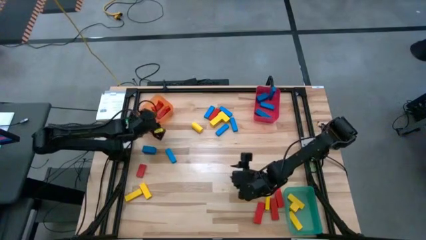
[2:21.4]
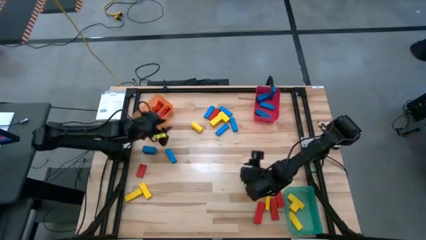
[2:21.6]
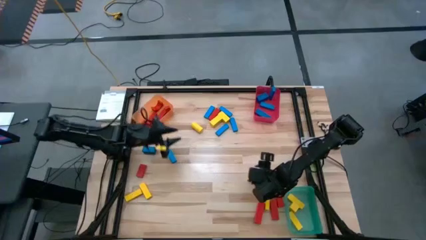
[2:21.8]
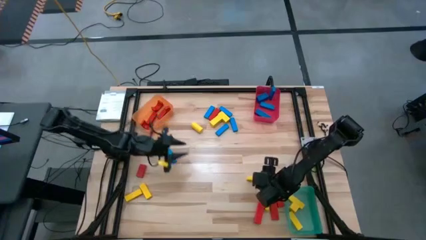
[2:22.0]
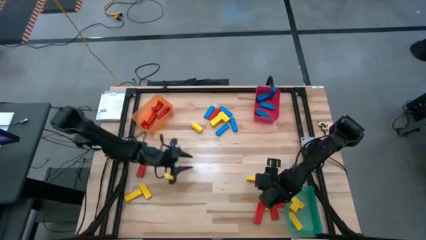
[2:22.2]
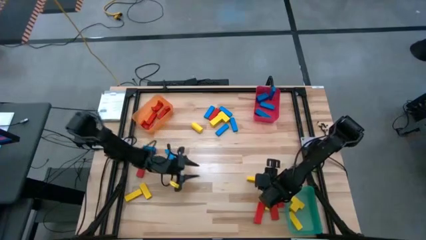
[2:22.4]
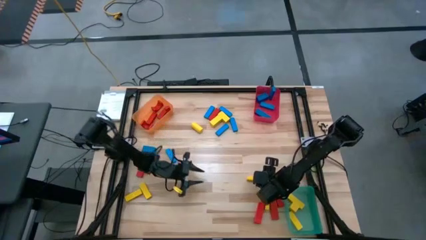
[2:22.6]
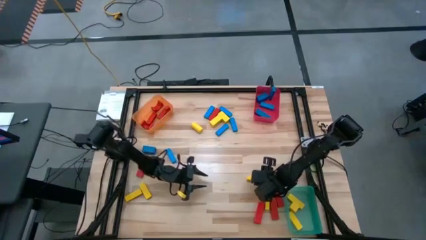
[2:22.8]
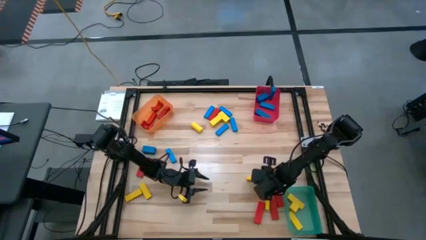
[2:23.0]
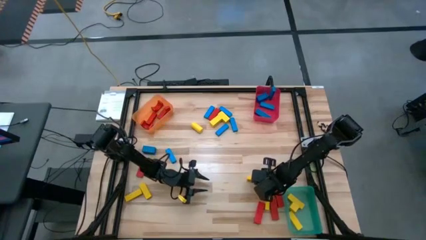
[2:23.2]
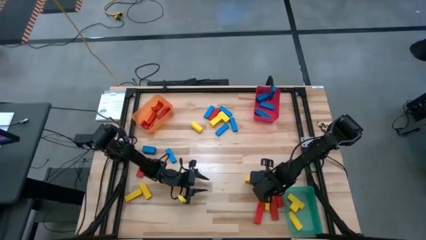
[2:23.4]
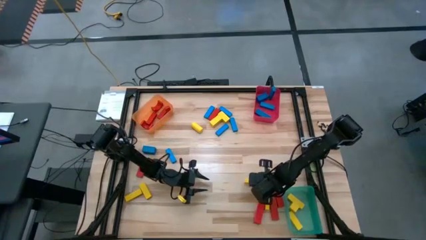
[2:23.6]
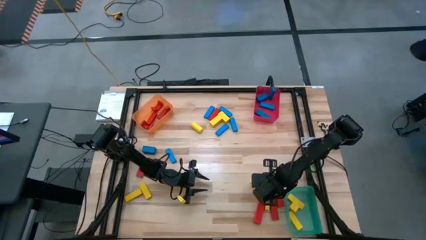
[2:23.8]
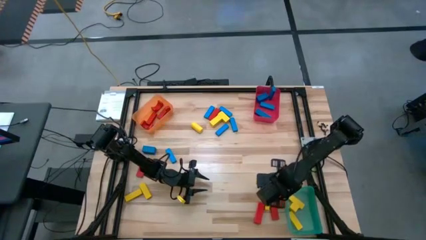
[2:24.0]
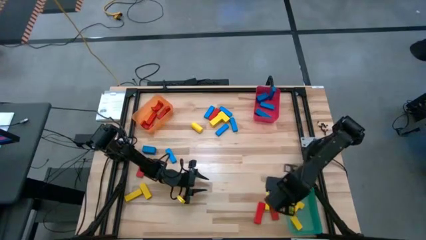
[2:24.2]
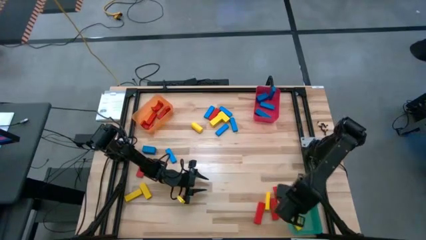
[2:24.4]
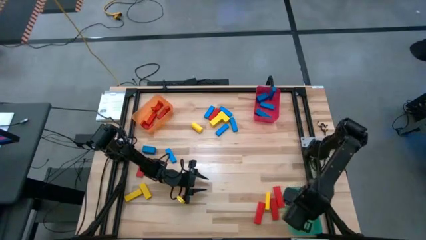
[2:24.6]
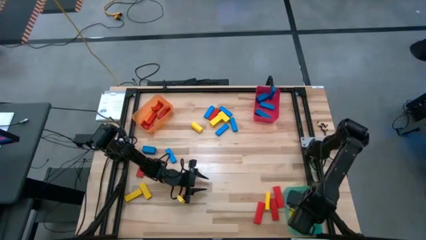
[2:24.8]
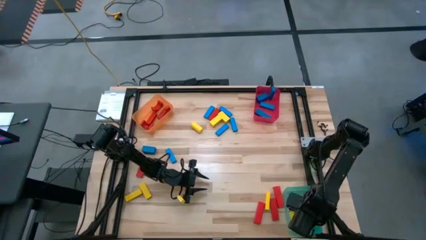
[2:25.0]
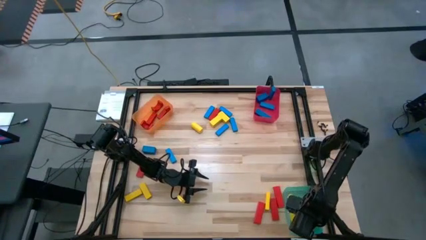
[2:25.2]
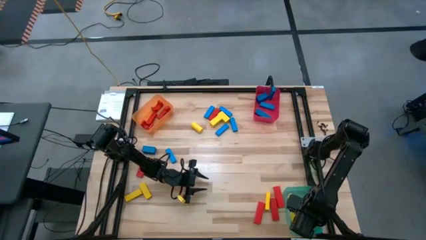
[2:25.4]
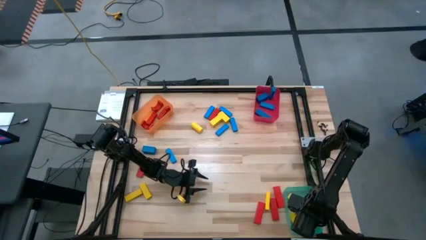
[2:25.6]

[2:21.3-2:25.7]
Task: Sort blocks
Put the yellow block into the green bin

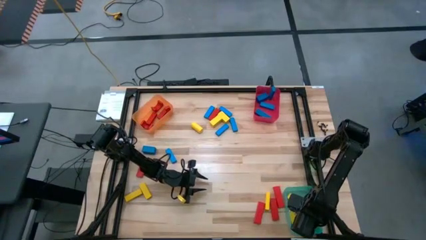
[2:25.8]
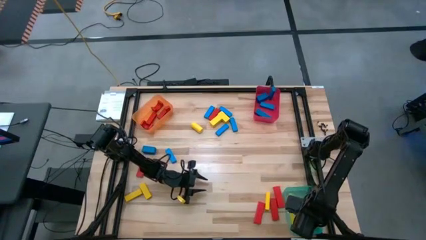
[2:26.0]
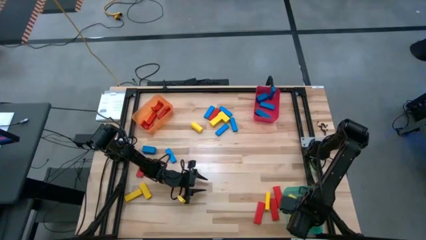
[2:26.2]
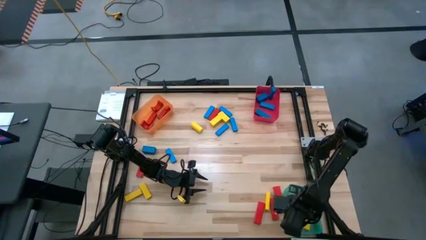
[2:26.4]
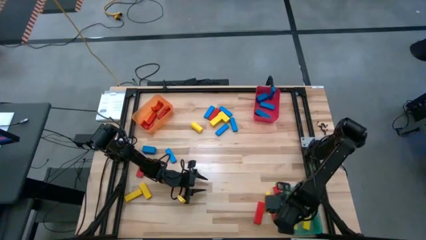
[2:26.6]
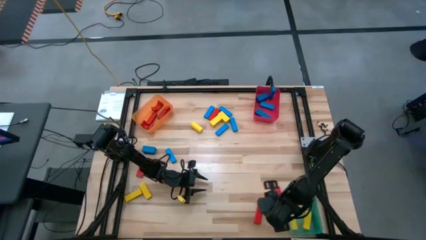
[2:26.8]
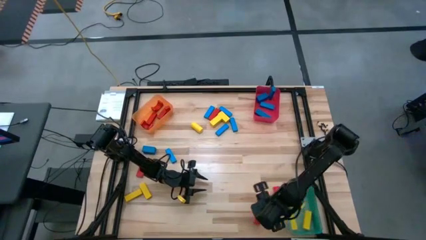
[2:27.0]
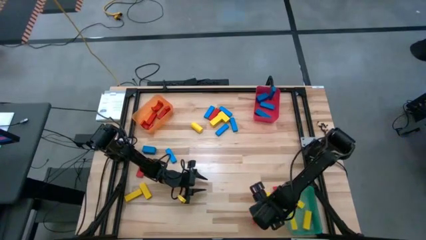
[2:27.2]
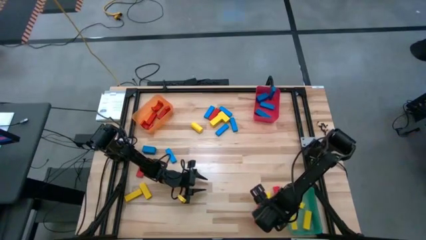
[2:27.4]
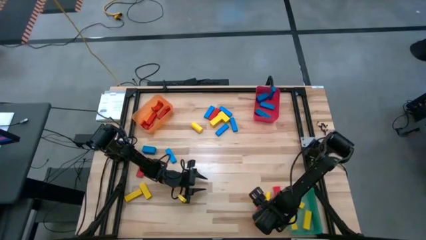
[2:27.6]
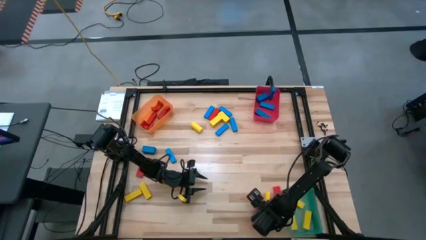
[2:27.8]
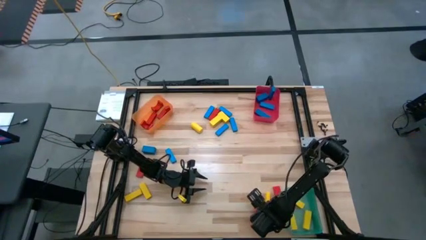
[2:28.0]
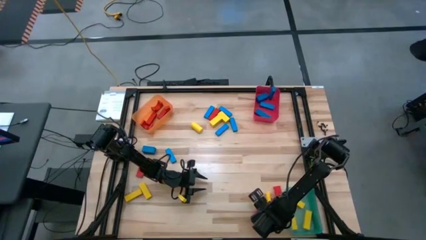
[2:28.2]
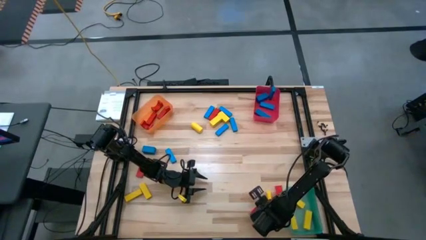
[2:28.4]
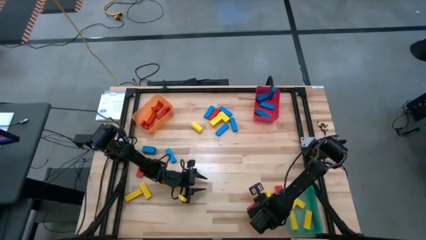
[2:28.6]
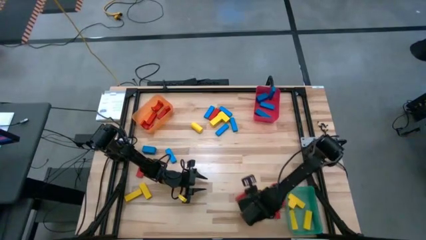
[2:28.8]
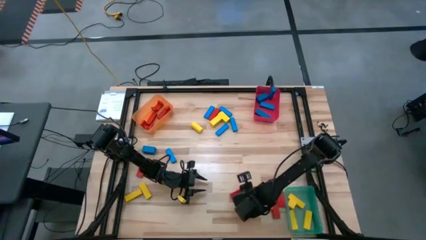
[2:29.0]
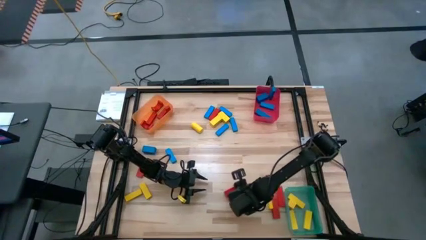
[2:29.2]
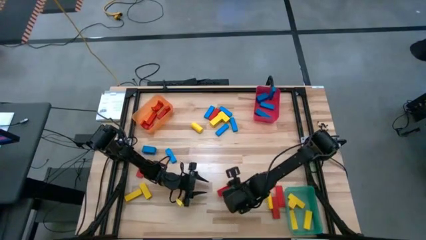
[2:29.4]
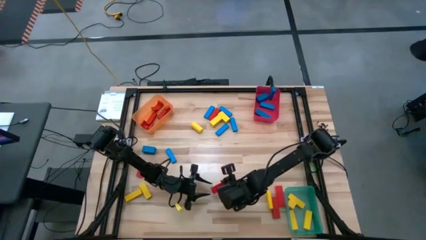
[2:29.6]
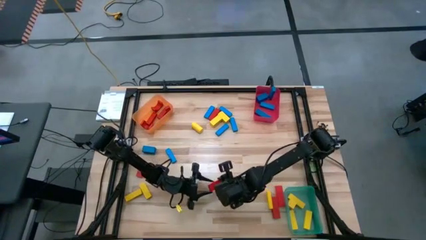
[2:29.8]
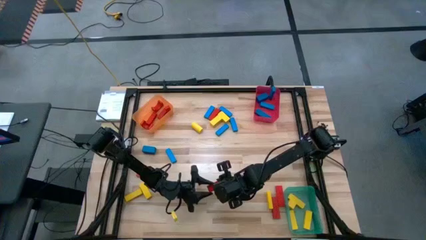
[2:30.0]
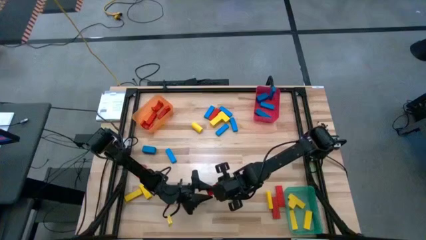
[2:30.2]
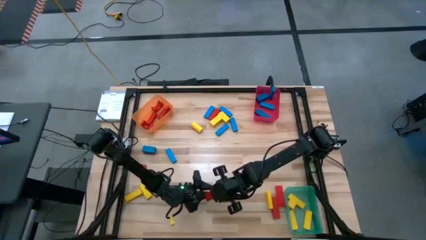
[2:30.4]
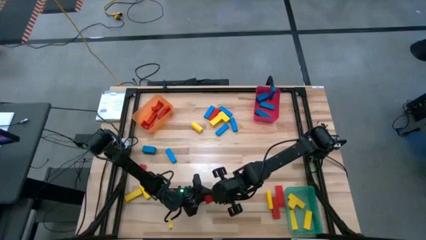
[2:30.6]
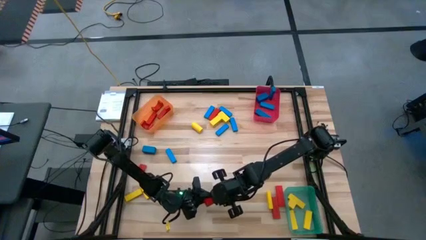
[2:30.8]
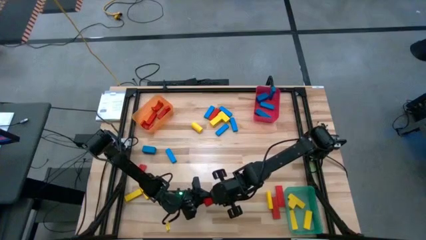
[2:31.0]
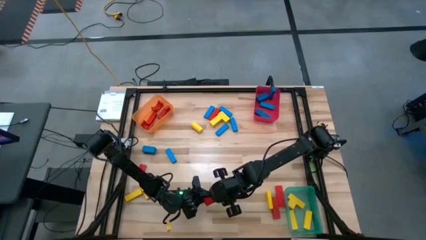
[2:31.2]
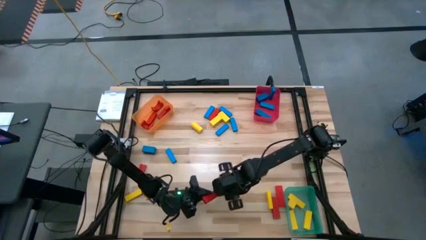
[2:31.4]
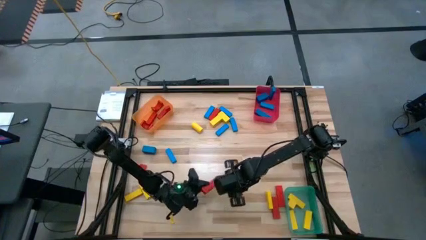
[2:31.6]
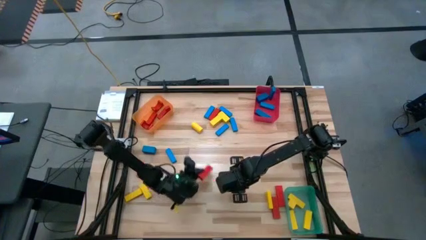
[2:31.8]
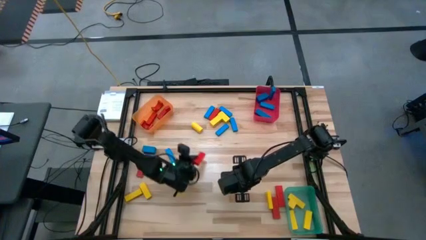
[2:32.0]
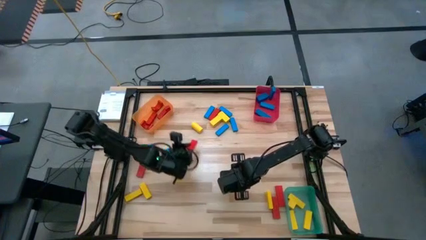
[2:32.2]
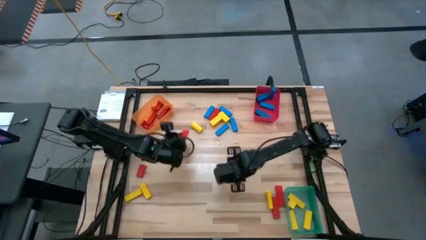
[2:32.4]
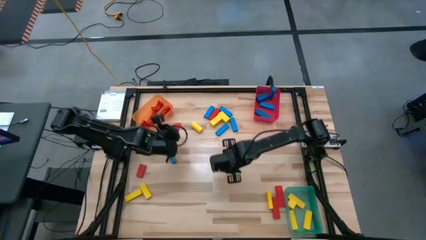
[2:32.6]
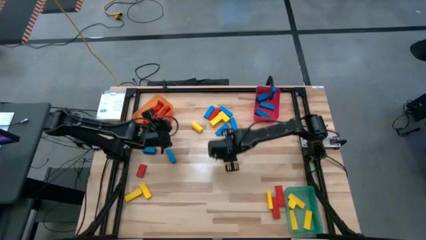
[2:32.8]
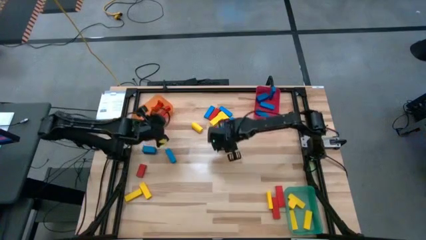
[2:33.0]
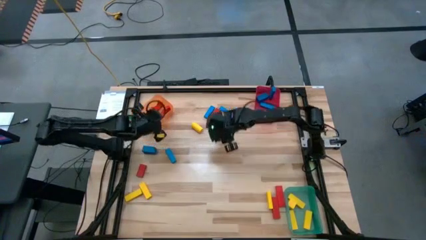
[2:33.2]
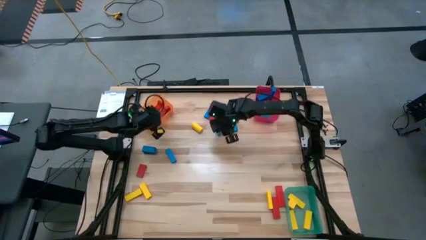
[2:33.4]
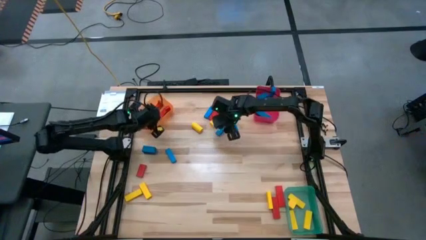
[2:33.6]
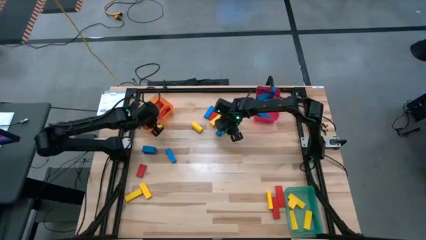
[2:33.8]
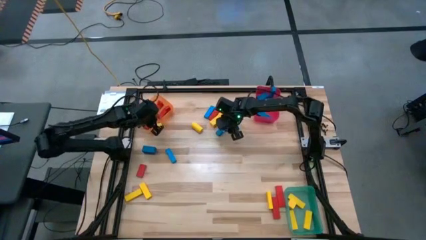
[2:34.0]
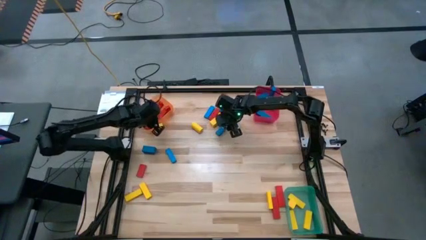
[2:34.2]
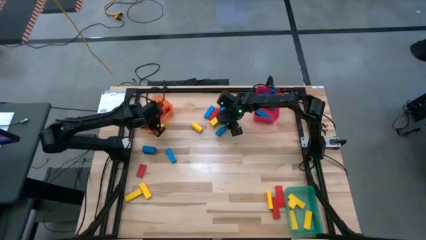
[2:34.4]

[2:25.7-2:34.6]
Put the red block into the orange bin

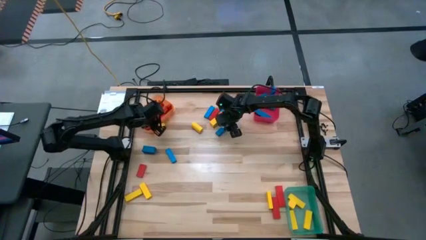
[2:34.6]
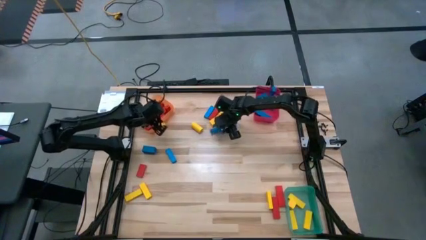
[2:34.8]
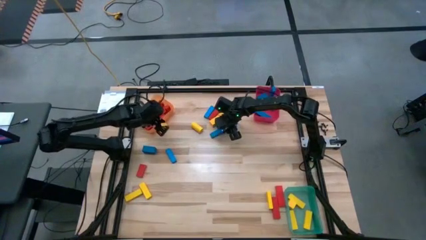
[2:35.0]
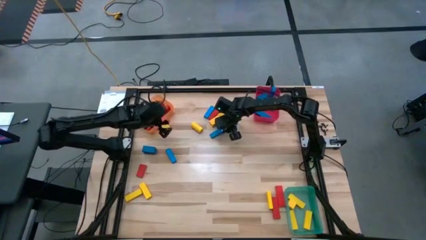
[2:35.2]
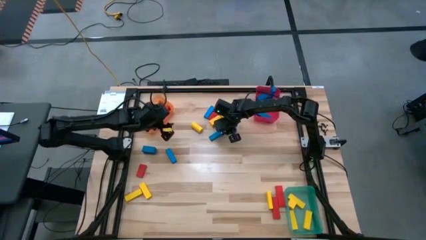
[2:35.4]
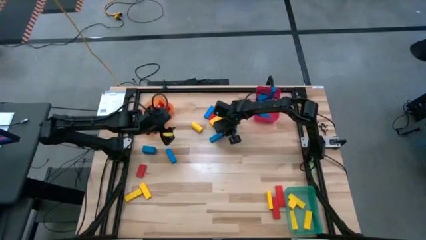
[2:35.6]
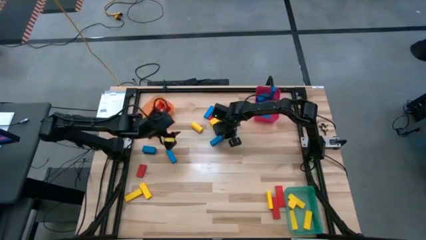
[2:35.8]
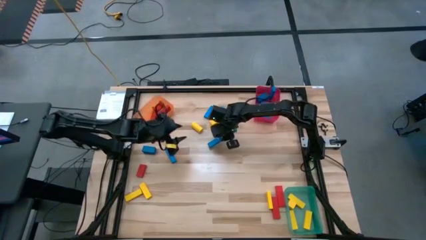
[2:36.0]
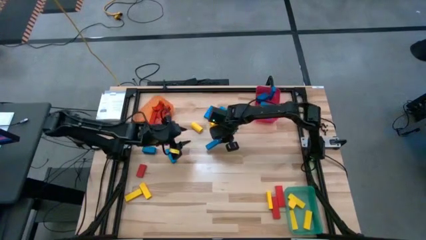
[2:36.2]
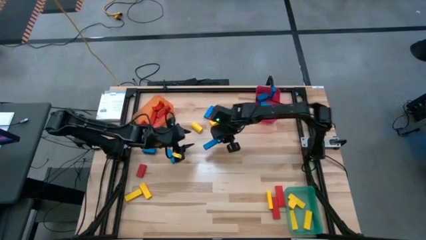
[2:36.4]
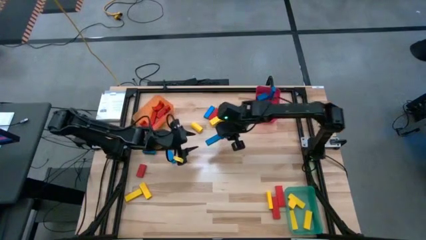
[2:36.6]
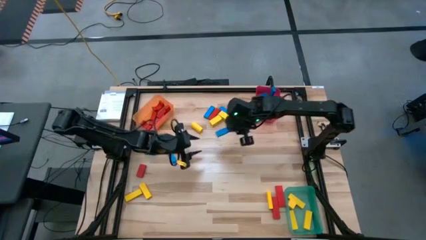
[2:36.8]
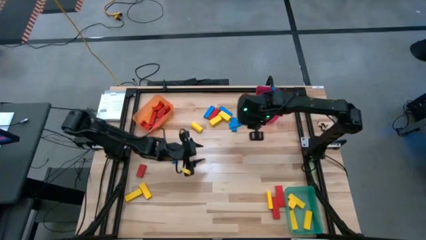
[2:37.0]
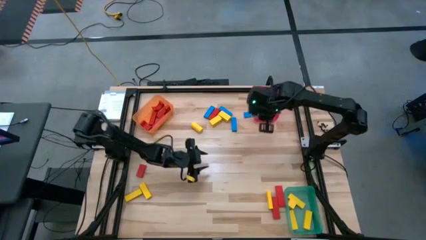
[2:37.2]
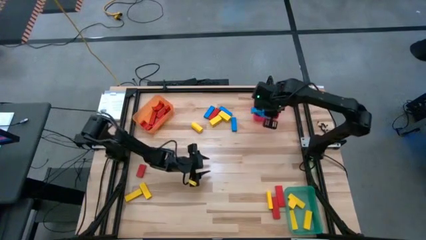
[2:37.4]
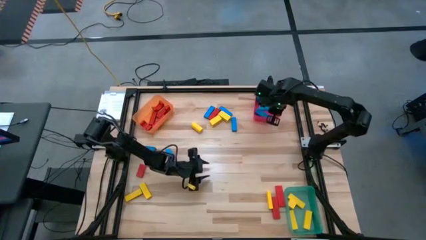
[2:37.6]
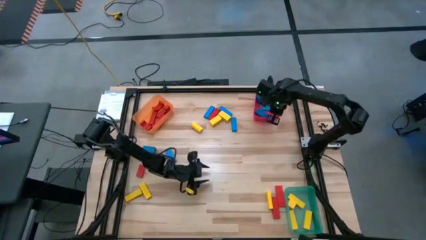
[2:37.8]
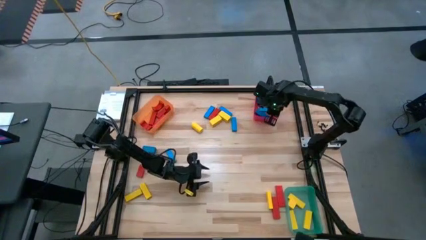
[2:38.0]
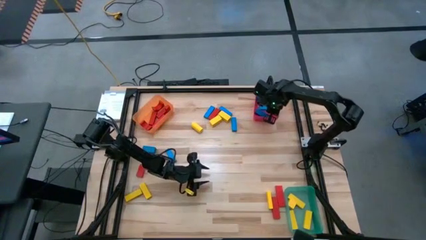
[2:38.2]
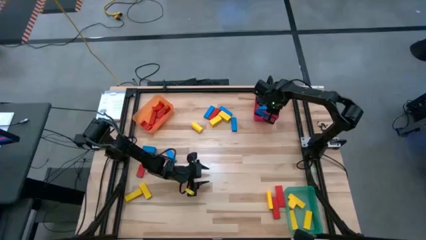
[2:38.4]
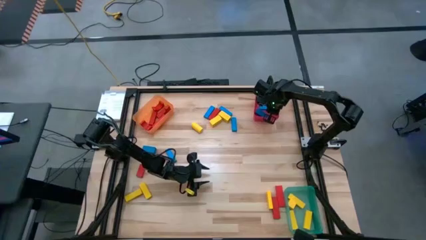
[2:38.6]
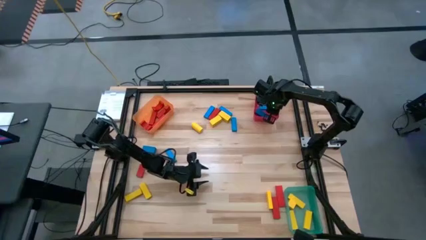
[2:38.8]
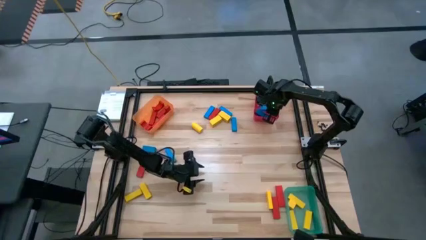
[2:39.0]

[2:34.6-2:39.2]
Put the blue block into the red bin
